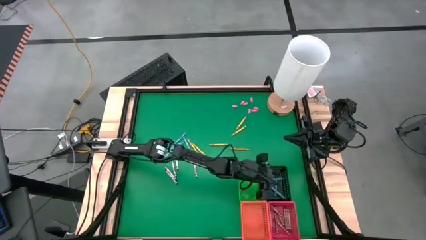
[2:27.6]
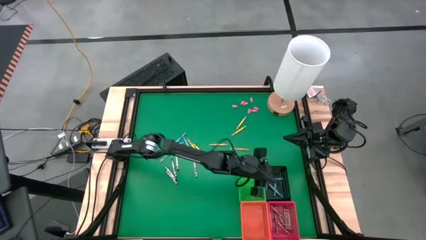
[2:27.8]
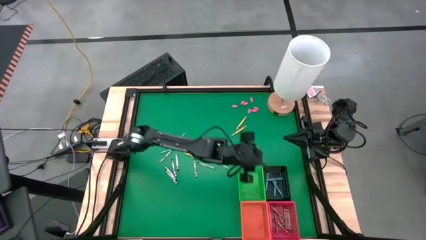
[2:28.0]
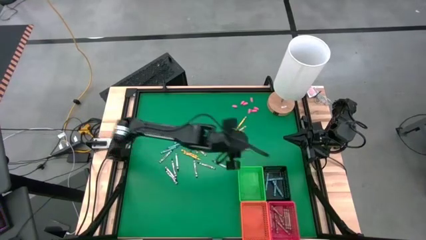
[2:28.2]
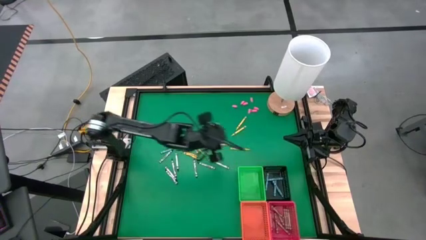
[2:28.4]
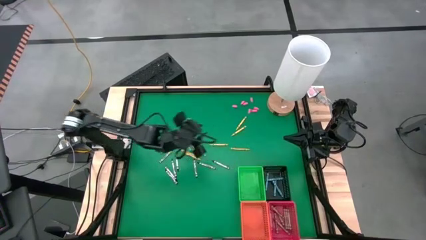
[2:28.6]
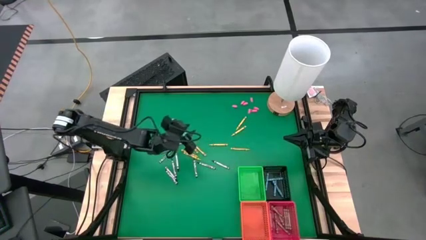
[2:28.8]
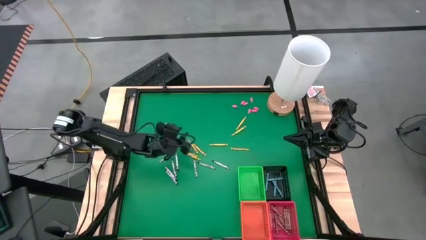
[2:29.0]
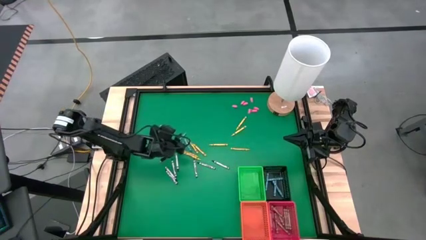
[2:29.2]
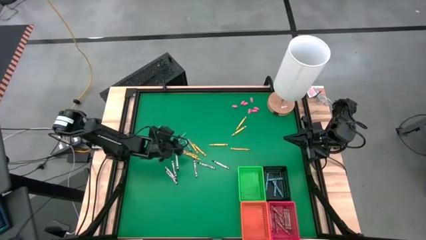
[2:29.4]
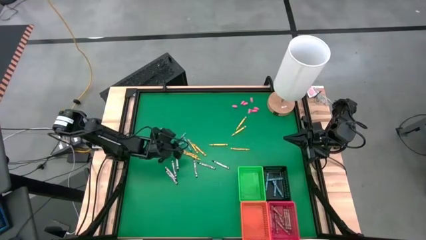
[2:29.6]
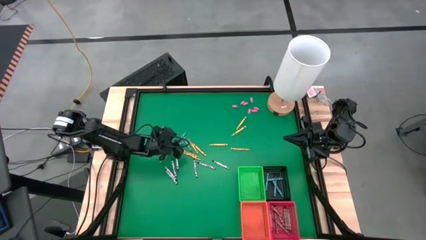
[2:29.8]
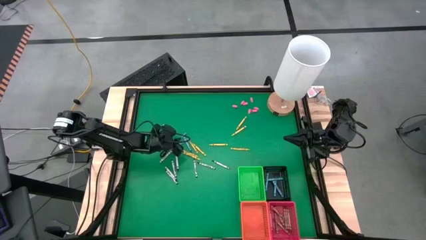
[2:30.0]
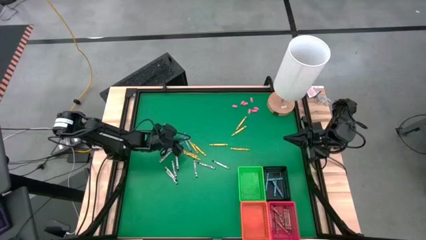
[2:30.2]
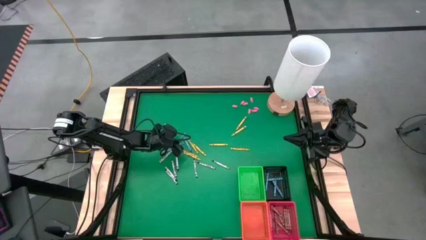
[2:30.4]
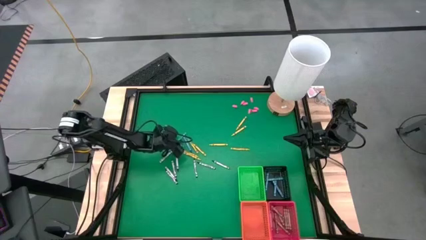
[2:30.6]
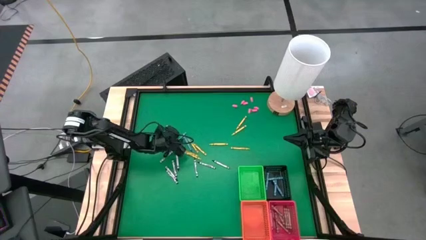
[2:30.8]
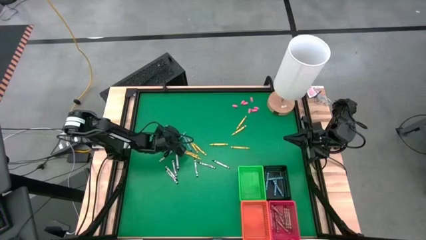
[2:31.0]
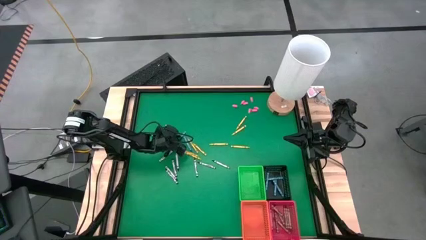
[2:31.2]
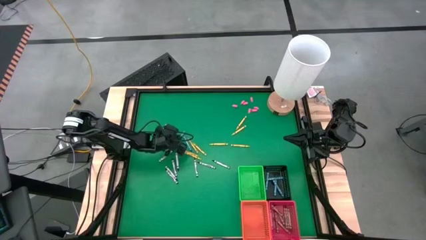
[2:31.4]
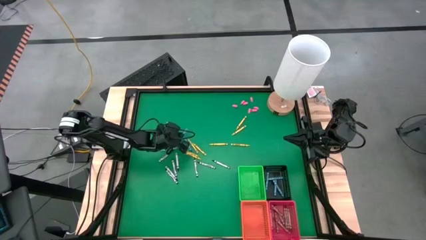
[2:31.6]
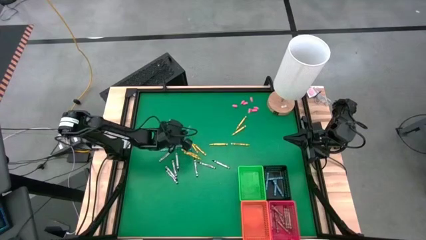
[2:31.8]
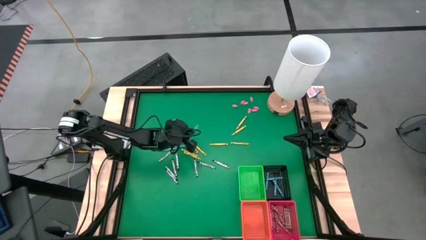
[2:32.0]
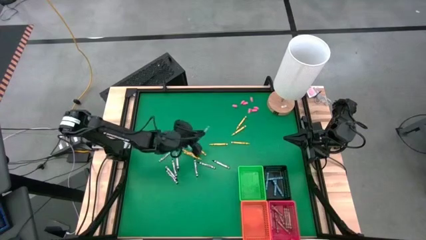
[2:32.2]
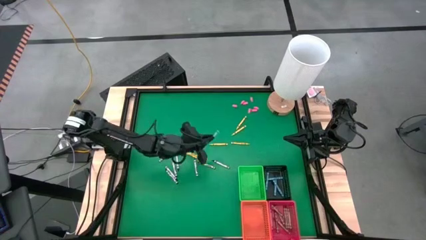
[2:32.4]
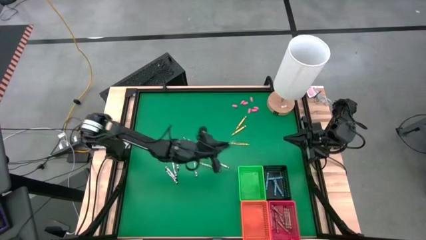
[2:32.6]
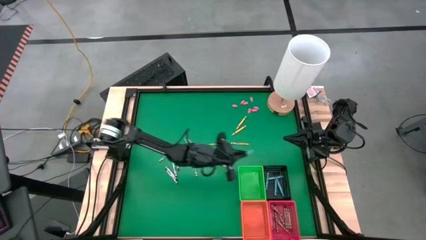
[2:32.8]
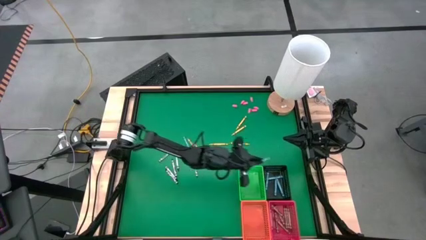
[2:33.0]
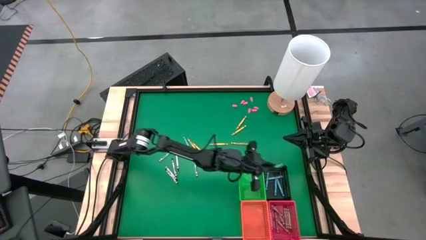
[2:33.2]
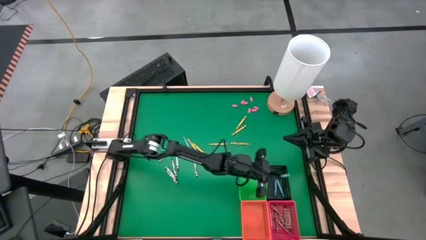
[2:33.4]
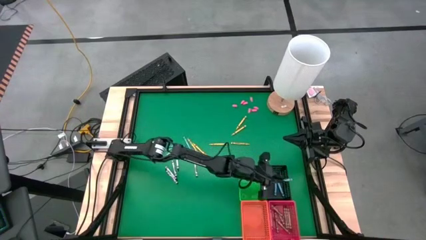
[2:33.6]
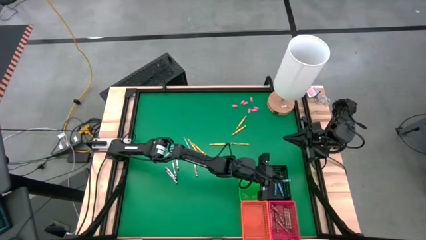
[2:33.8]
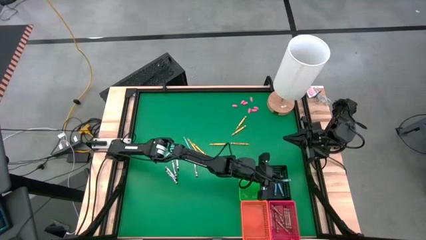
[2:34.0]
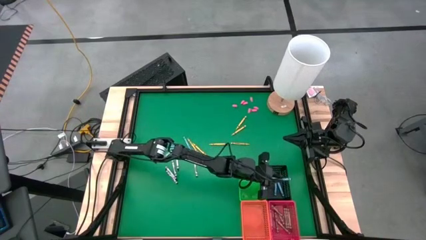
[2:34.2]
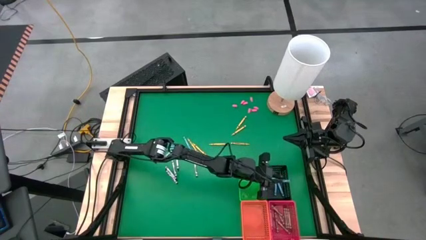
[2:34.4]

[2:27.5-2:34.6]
Task: Sort crayons
Put the blue crayon into the black bin

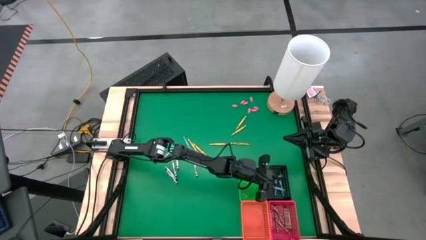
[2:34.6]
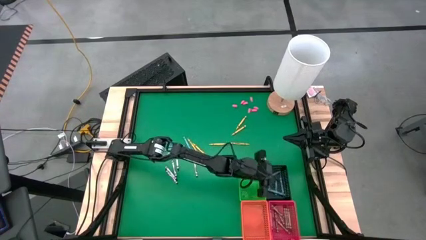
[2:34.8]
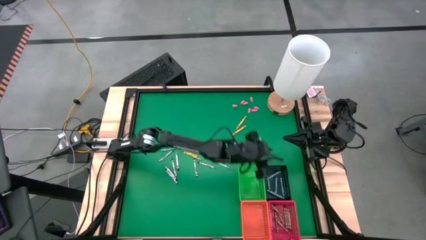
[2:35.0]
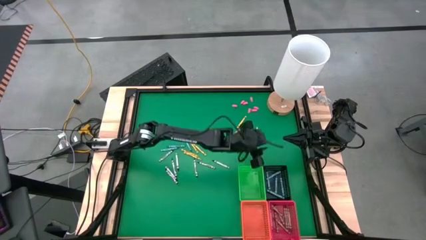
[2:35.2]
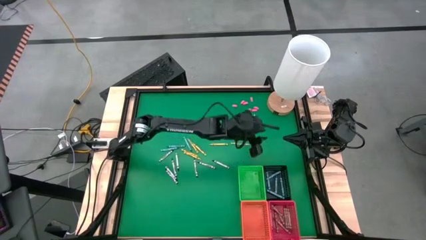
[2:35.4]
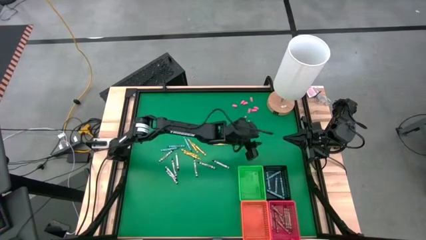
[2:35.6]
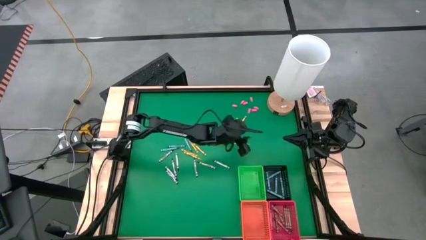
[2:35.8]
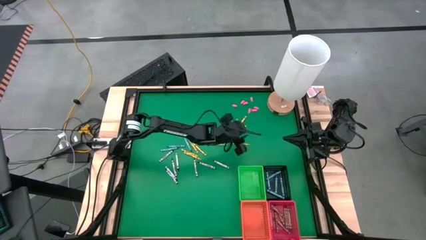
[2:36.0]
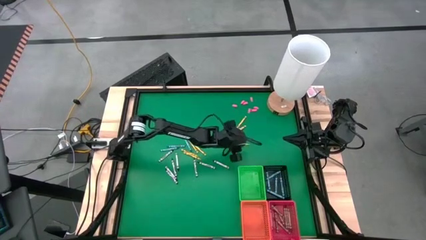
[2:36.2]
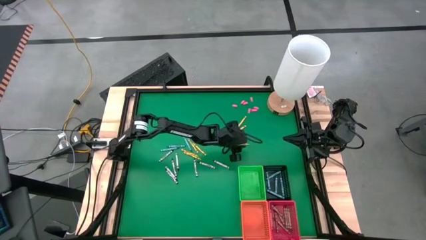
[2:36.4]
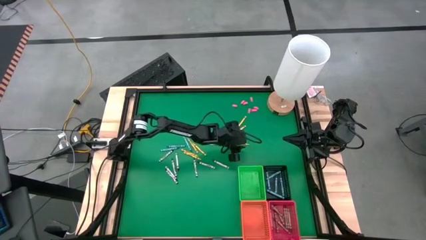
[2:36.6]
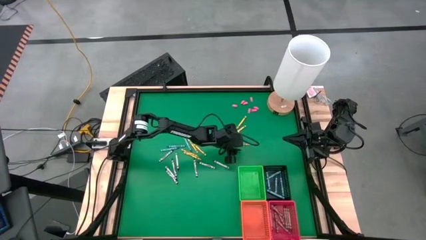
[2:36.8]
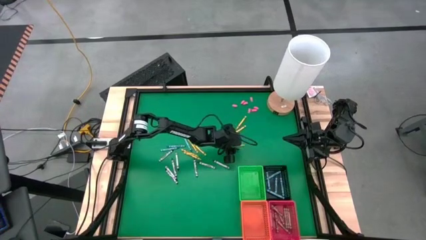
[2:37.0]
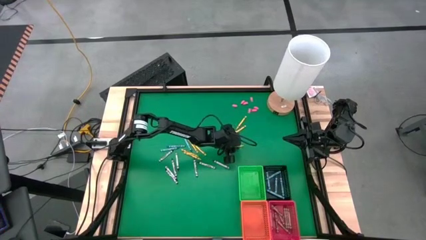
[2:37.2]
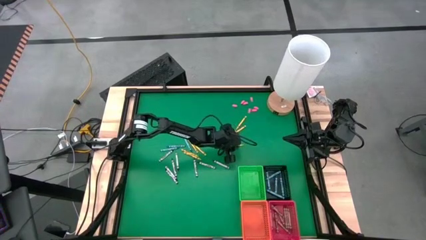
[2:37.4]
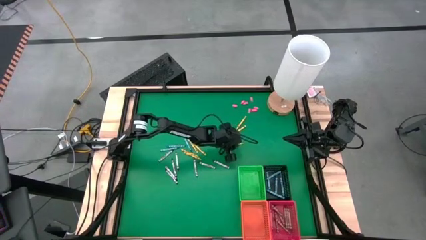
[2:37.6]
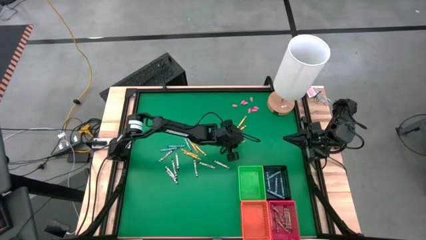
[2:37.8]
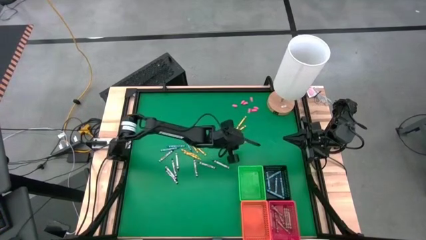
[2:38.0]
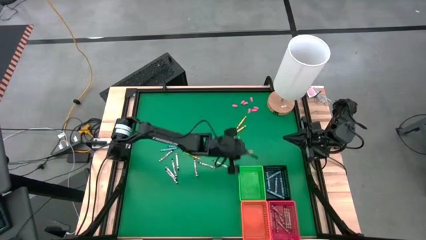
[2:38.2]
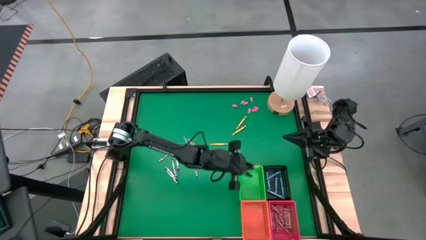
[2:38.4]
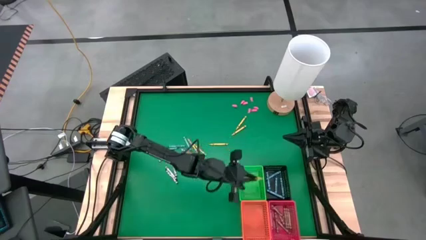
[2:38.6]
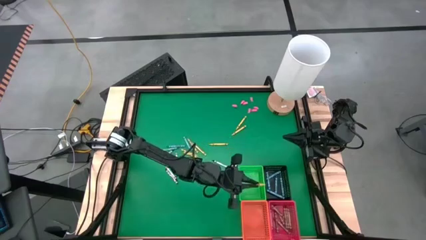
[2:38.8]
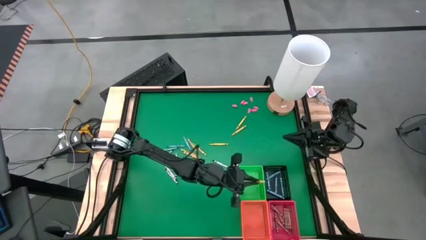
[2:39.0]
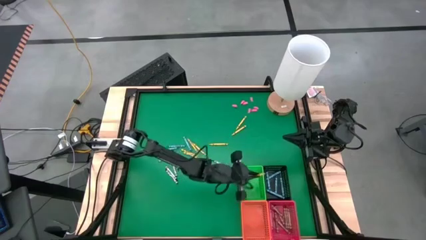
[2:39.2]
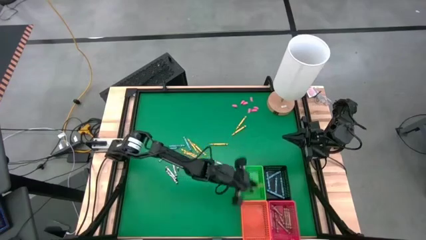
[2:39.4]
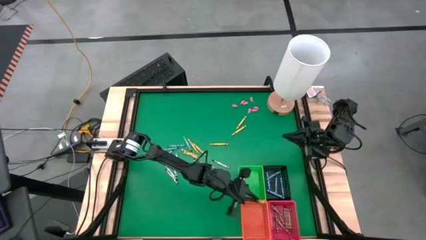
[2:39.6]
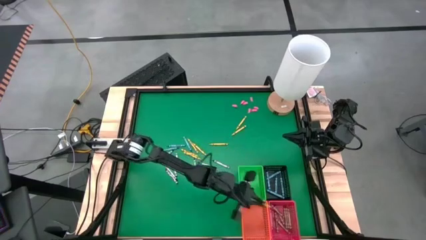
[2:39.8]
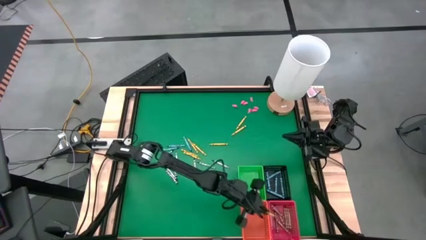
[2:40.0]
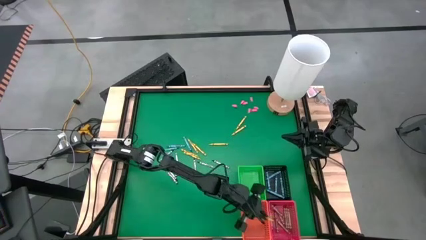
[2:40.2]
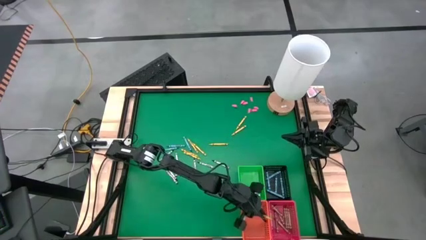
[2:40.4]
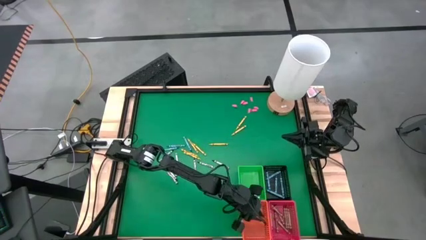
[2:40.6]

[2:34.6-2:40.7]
Put the light green crayon into the orange bin

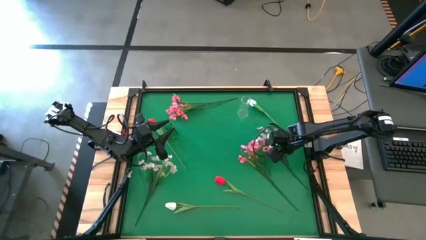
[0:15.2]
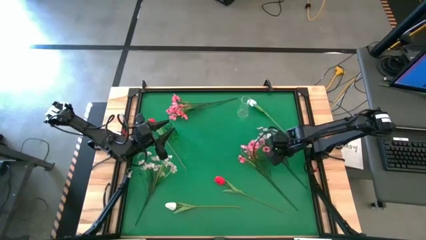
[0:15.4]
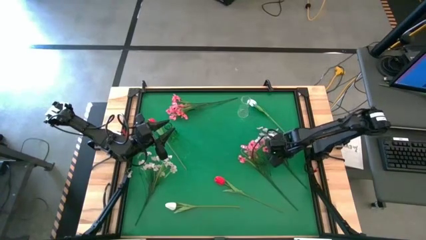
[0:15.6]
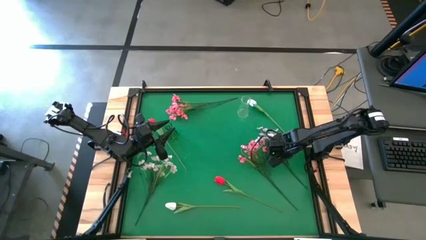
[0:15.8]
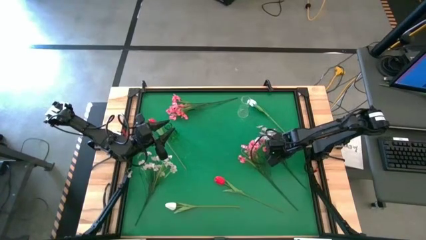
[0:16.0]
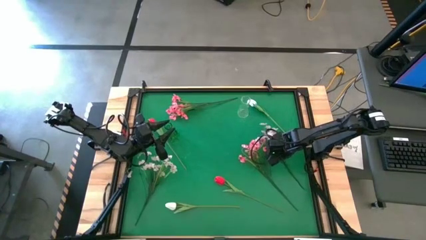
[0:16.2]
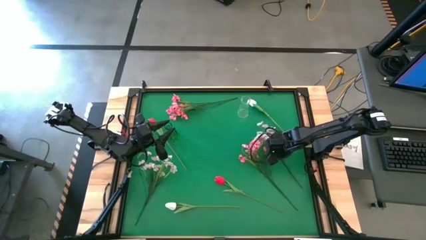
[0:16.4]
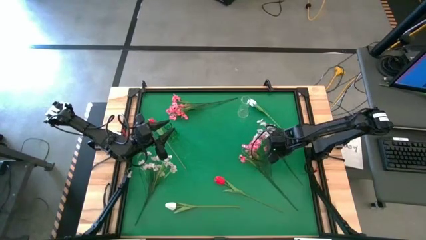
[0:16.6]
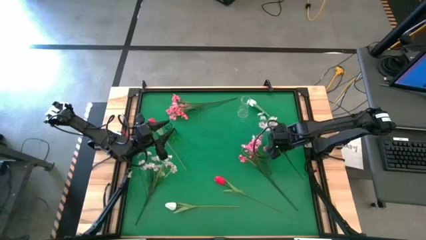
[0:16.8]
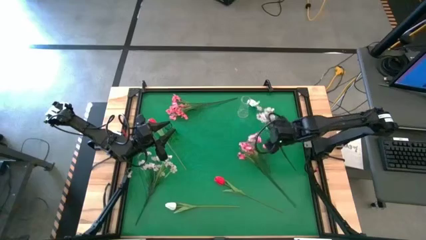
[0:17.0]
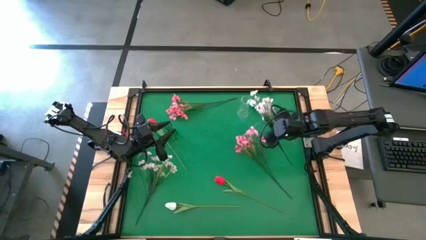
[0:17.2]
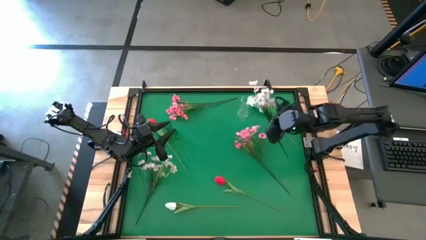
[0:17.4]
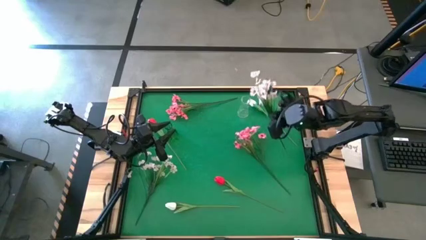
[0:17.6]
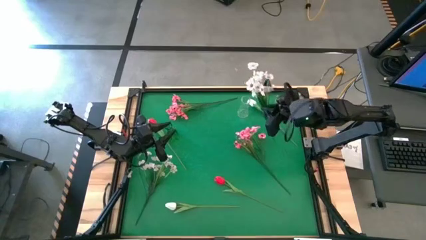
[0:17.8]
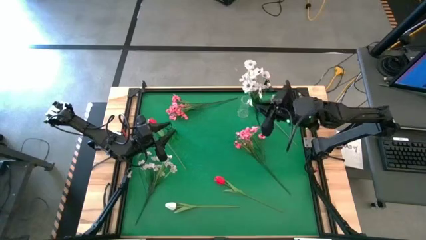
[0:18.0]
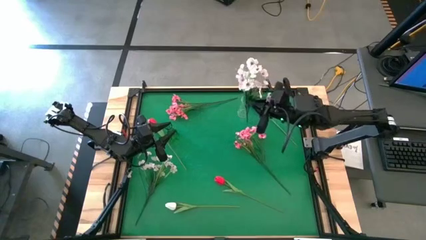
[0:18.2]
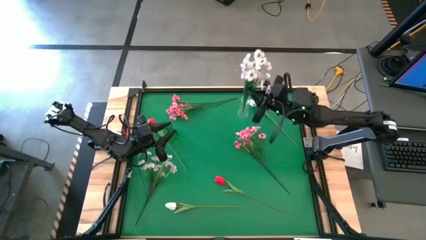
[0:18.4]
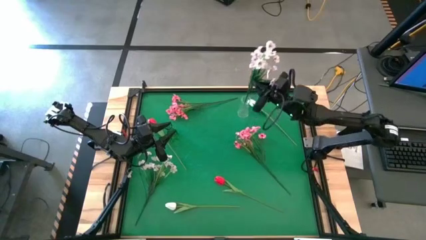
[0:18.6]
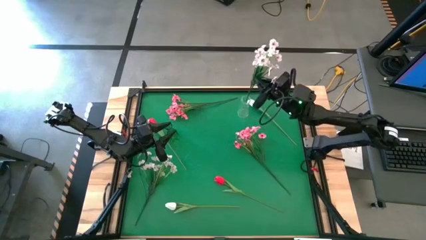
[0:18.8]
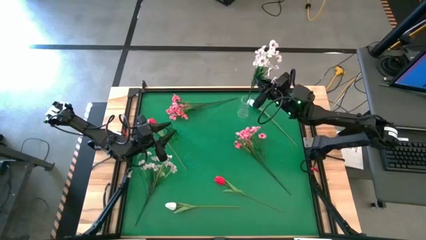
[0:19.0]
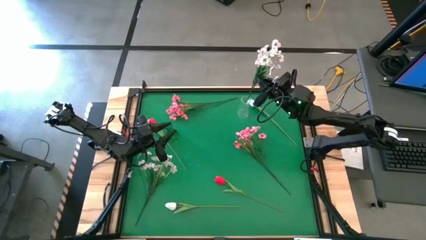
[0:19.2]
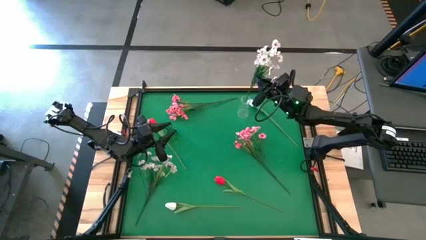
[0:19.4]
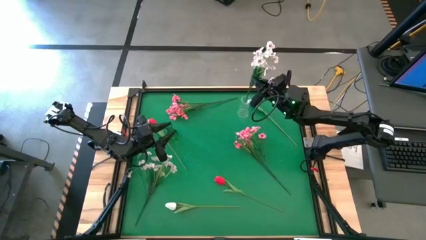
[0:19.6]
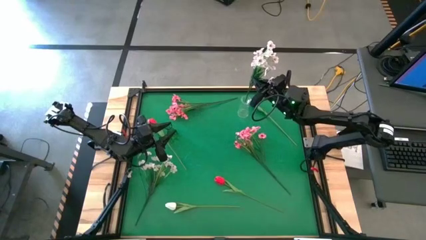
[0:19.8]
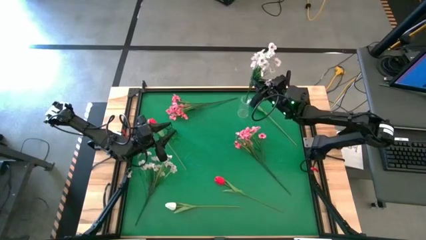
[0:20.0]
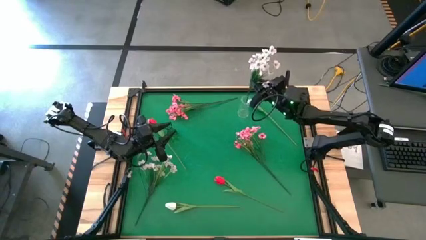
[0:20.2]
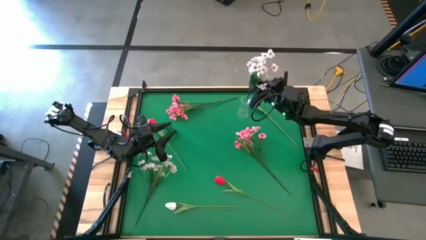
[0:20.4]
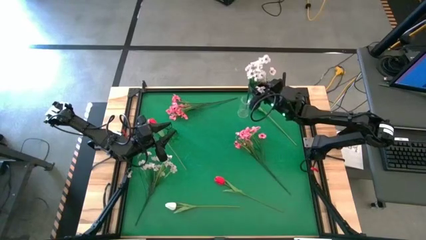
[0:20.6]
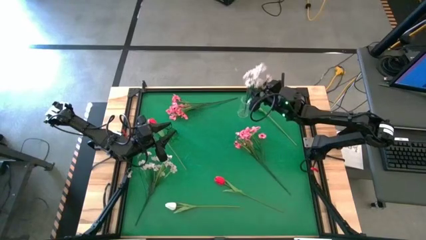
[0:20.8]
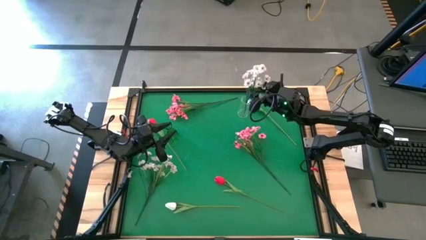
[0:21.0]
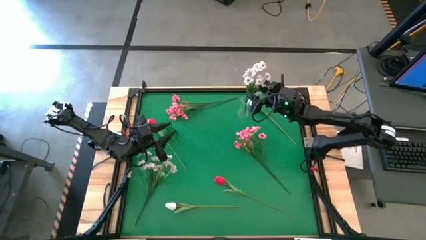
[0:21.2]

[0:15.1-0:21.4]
Task: Sort flowers into vase by color
Put the right white flowers into the transparent vase
